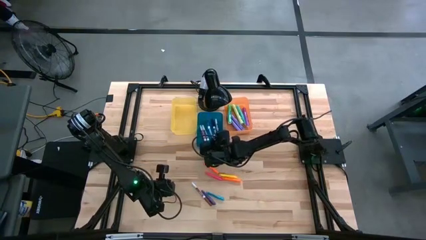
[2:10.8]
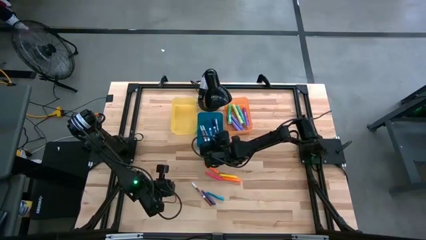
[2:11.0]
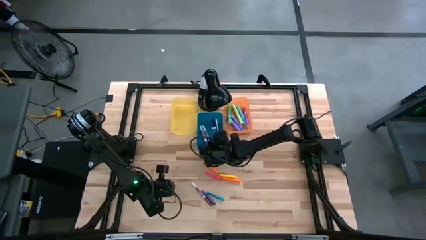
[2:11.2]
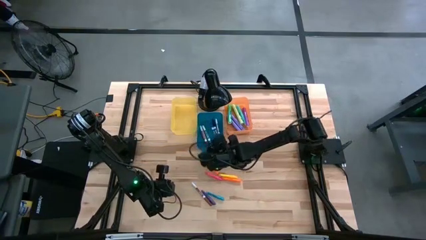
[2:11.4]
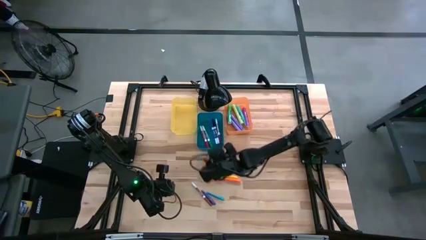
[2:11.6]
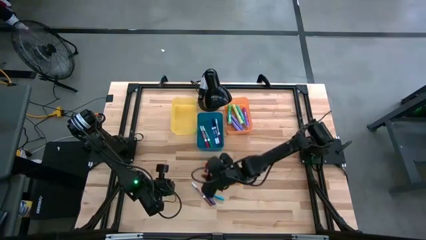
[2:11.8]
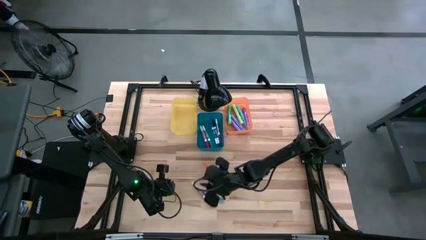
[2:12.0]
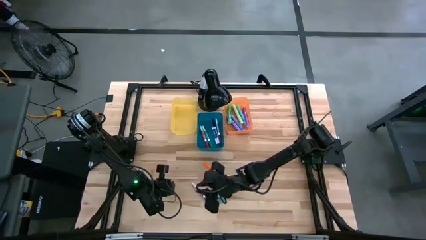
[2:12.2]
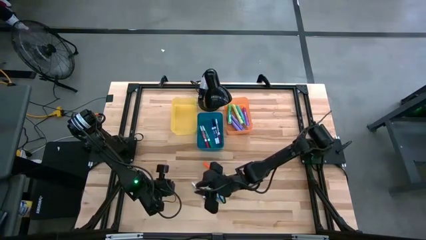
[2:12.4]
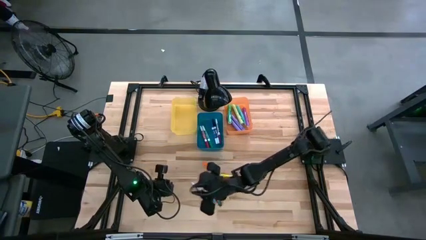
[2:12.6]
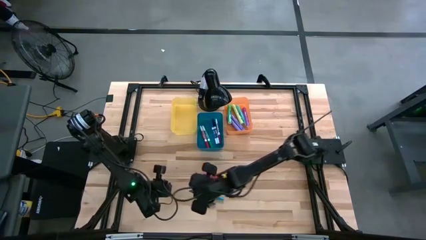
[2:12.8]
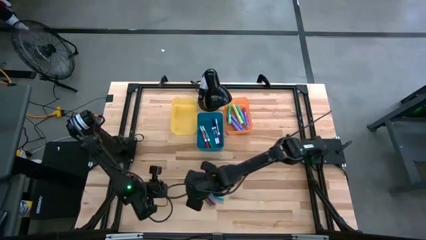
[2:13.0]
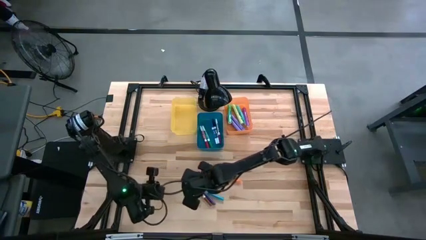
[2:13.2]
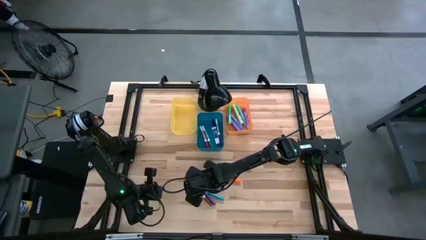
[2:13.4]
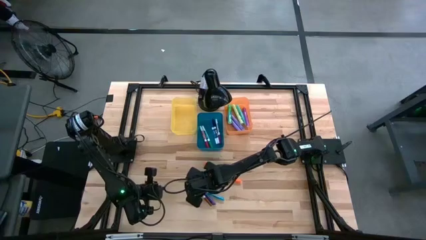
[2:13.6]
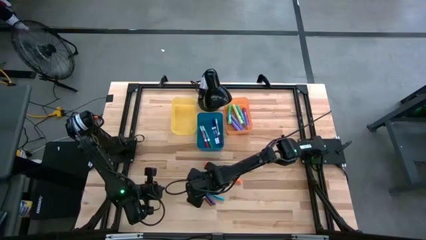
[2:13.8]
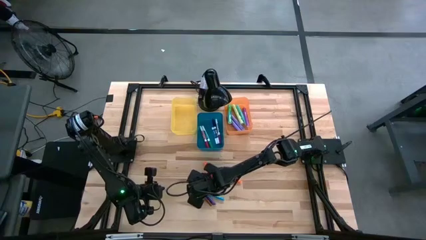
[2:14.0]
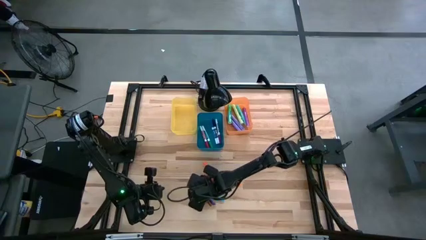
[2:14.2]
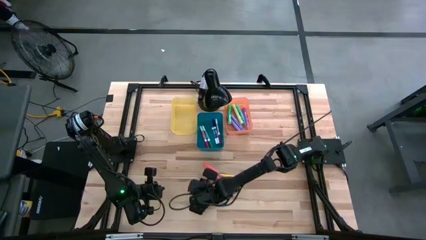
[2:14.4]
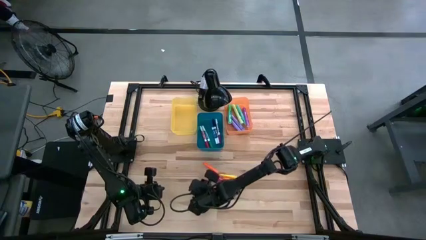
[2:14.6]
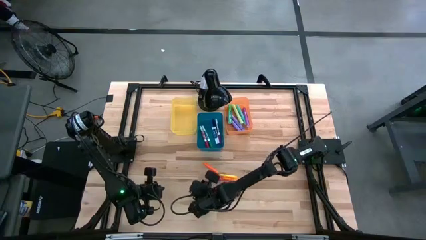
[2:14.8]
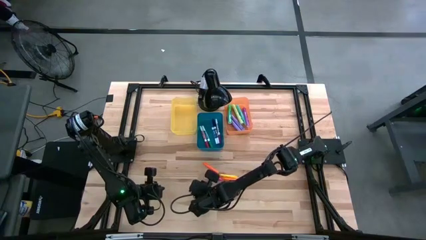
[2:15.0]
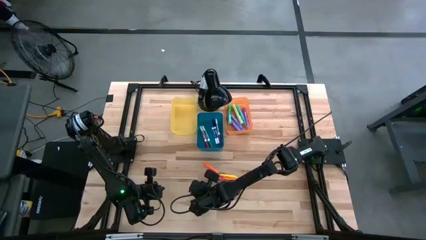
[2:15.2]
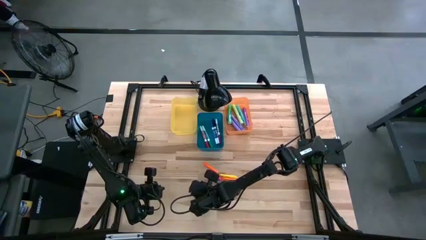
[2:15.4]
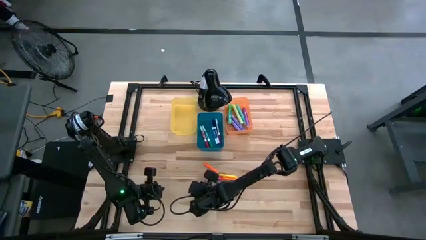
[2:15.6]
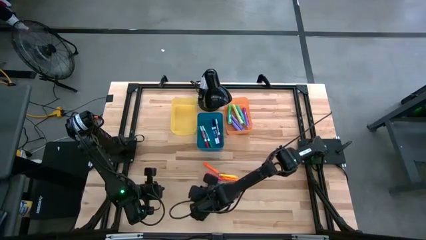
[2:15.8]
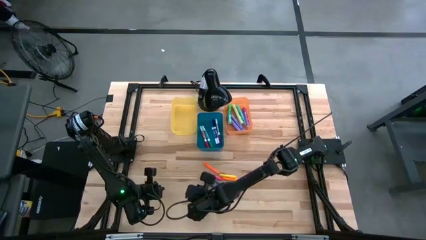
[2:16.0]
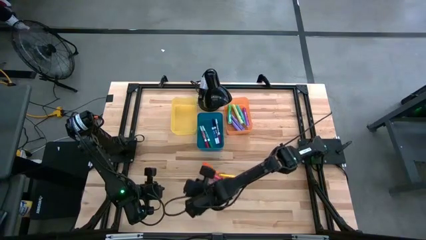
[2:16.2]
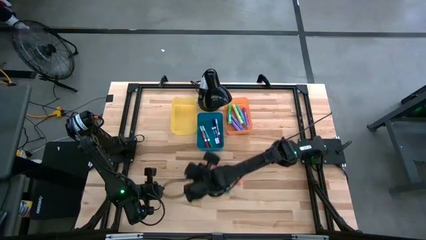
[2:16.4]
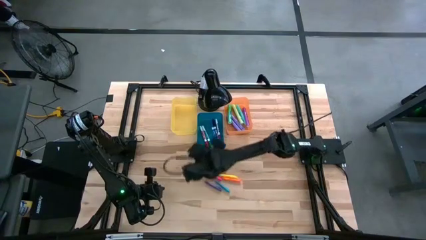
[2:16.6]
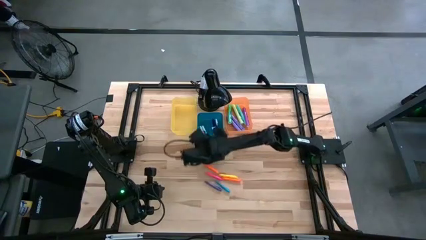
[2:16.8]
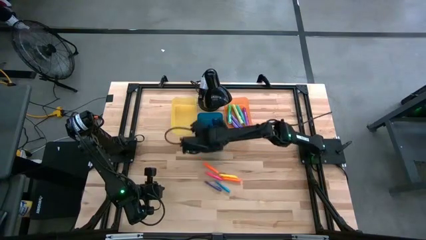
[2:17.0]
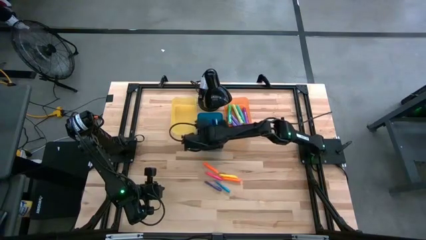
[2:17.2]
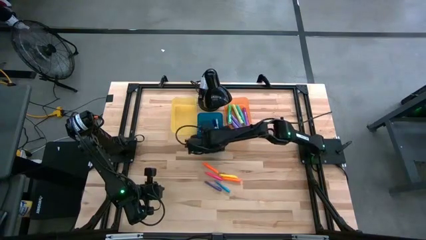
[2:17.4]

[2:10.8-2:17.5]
Task: Pick & Place Markers
Put the brown dry erase marker into the blue bin

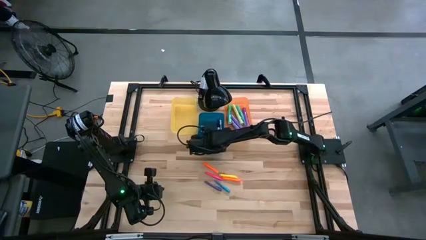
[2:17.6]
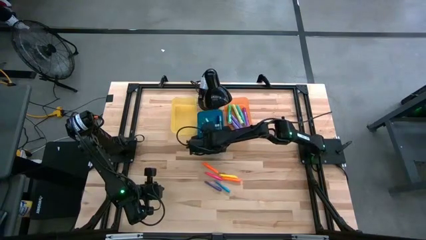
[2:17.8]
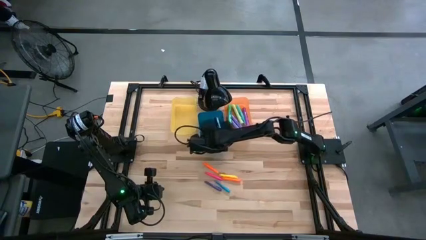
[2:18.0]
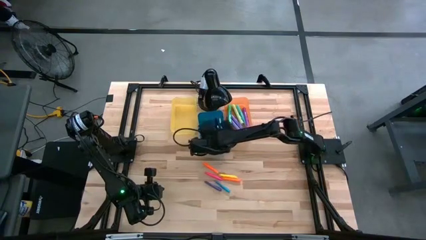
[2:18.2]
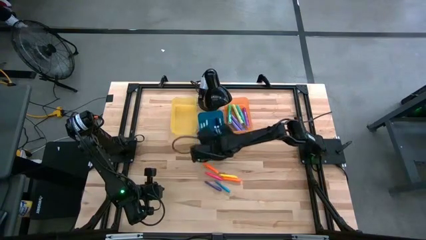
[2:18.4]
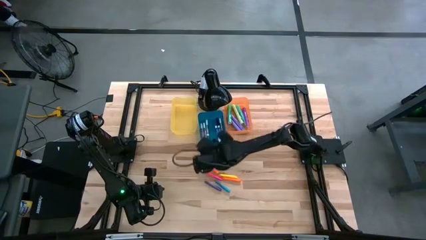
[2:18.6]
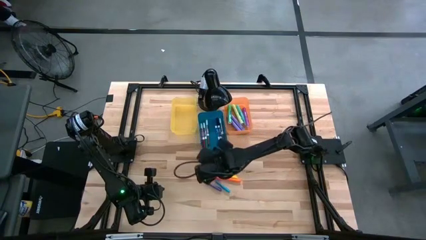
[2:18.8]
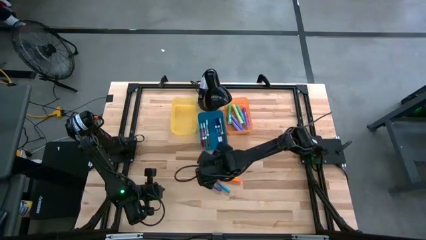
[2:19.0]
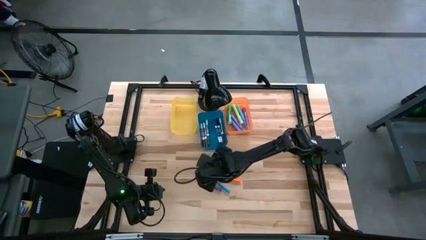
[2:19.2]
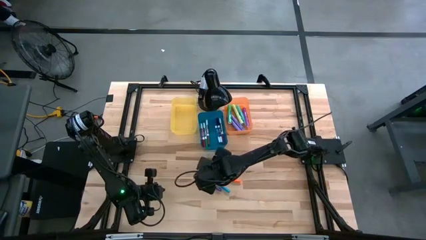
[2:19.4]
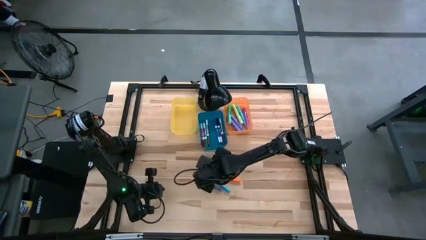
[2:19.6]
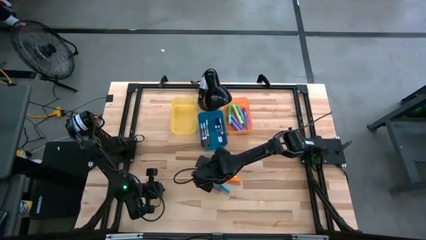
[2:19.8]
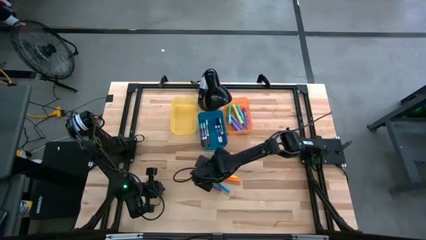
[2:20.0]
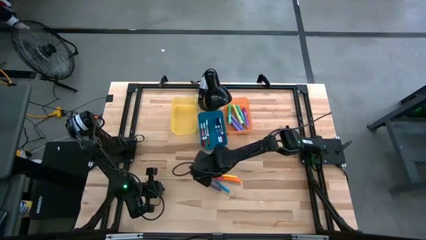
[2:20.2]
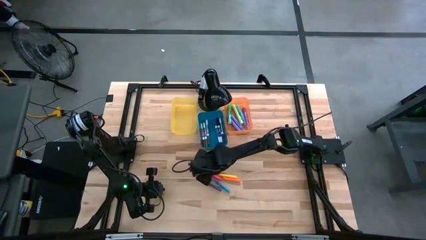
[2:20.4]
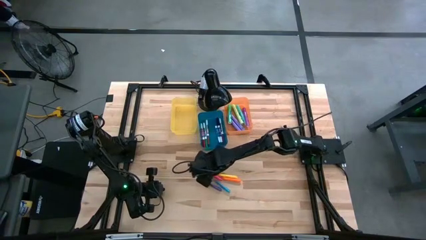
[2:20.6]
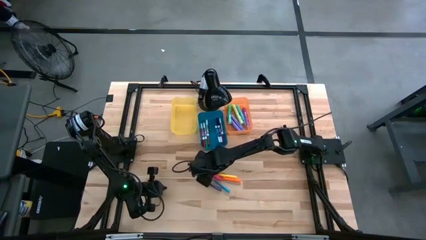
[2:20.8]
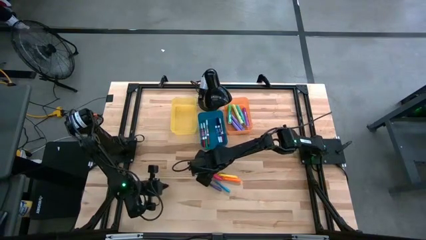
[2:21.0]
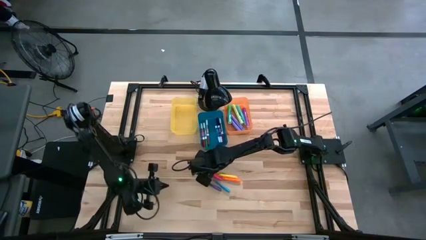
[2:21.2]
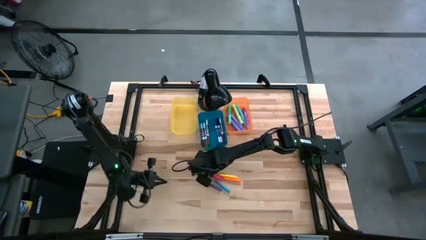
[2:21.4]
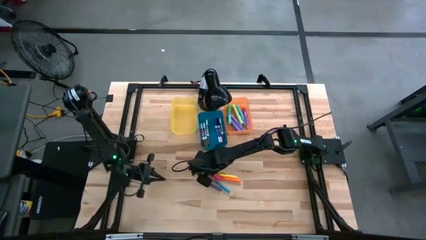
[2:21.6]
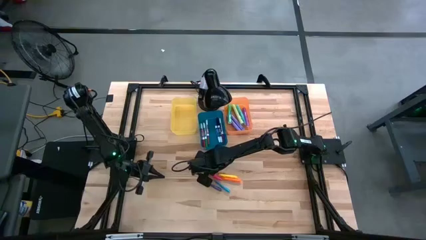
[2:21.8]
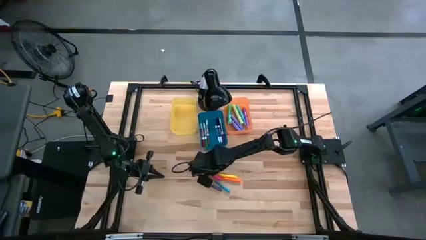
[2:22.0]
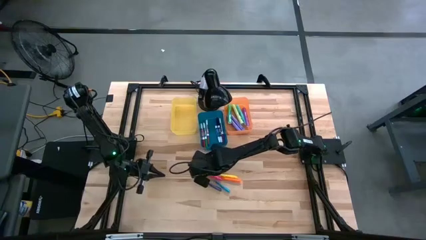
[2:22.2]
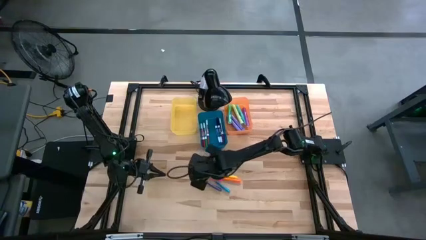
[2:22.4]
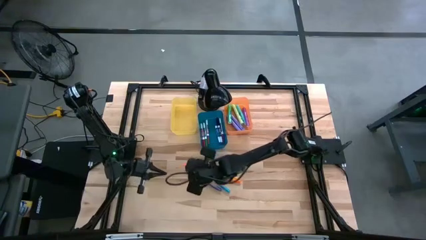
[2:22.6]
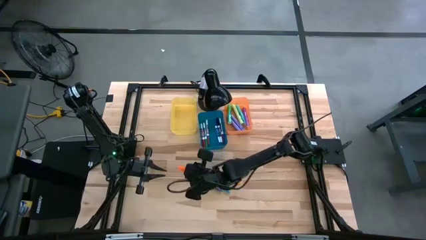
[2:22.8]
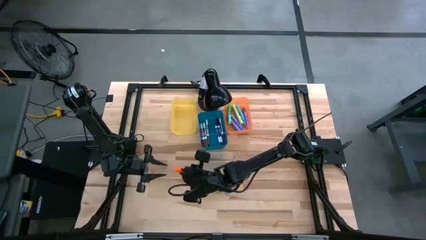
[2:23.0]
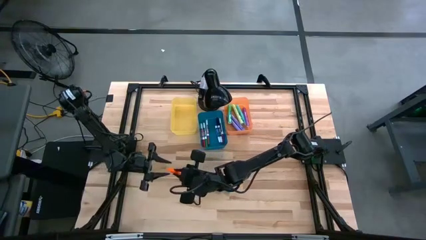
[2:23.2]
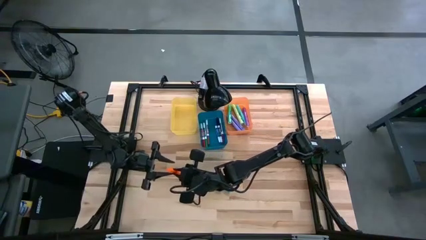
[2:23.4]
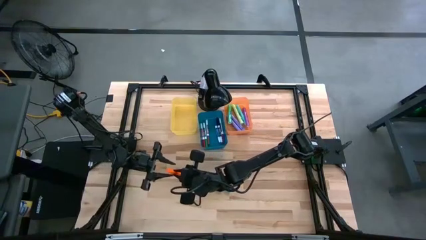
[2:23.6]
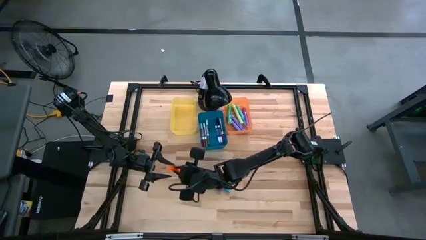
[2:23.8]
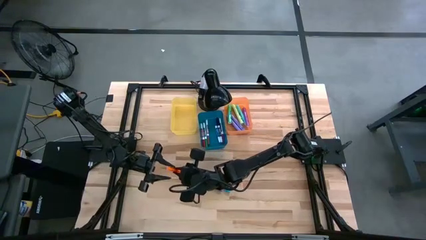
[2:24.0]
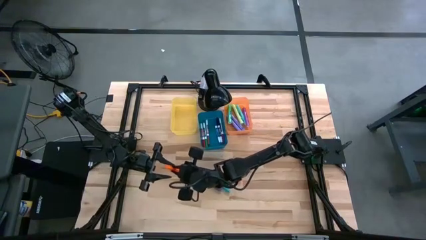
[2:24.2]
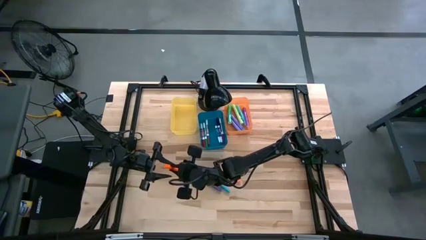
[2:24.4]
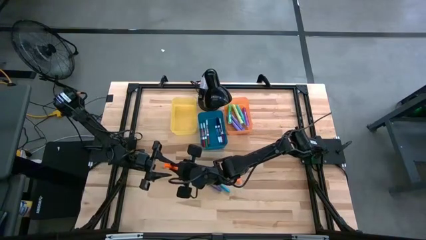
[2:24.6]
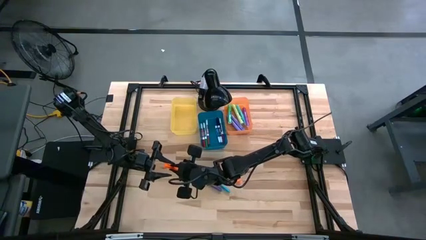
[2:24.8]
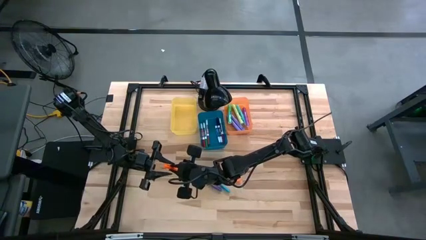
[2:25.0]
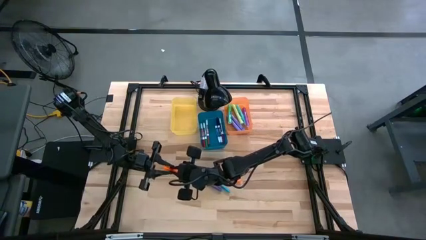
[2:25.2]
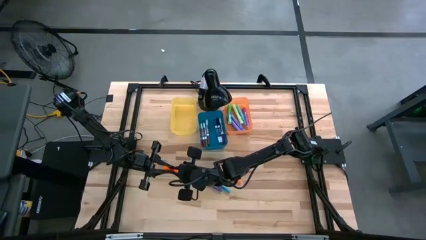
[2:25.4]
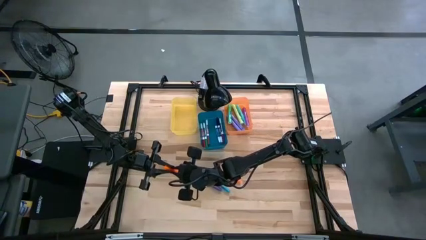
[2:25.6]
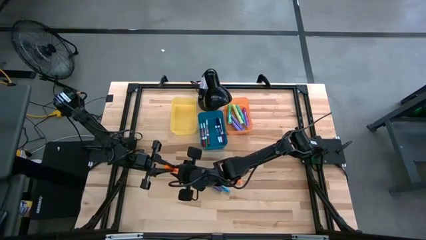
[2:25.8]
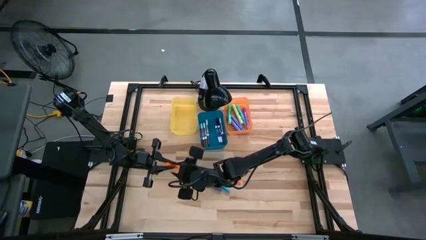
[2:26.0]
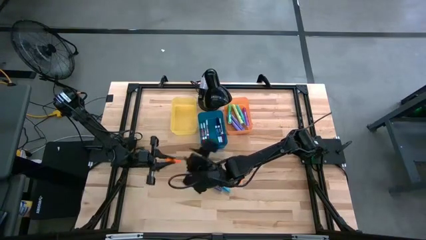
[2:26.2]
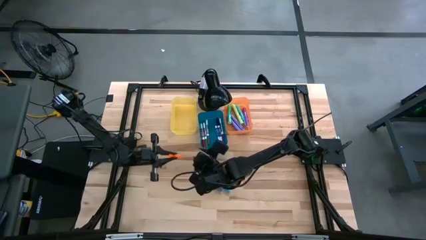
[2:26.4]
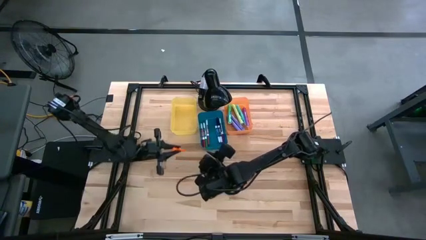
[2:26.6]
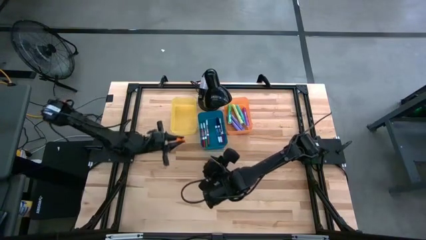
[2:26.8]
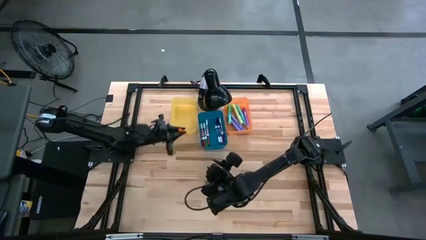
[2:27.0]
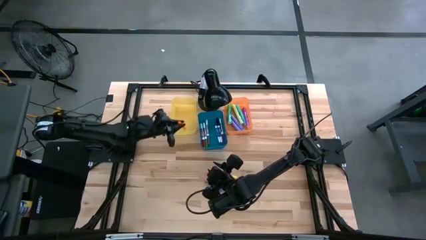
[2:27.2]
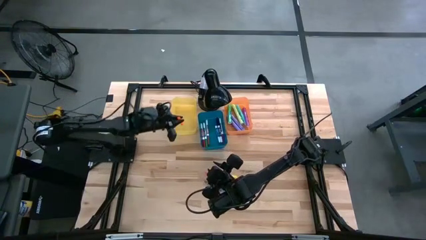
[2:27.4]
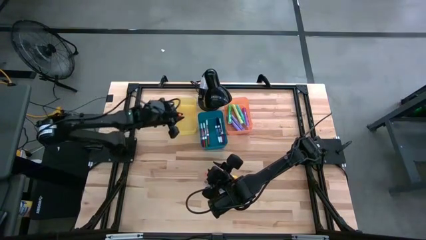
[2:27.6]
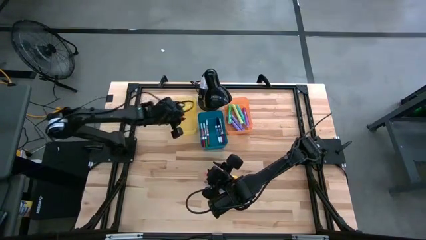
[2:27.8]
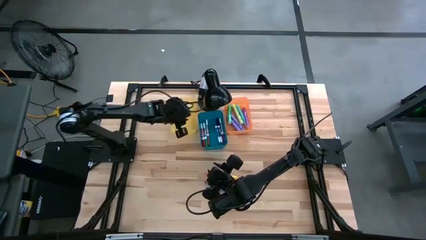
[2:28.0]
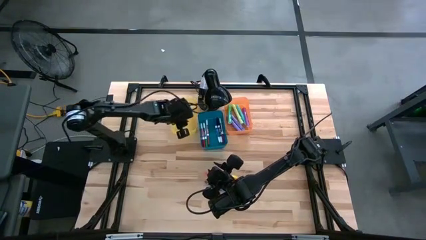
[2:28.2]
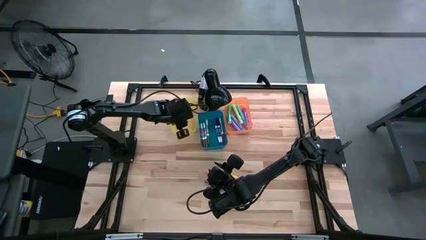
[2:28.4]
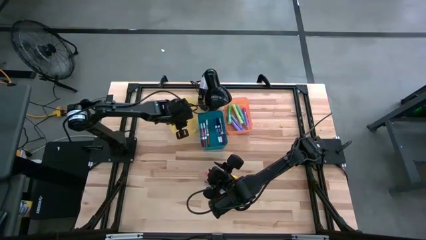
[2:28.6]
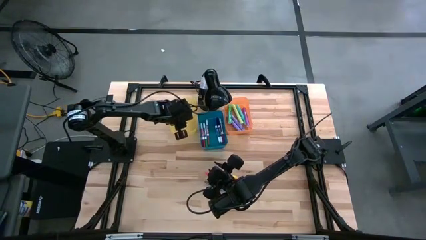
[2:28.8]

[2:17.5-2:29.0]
Put the top orange mini marker into the yellow bin
